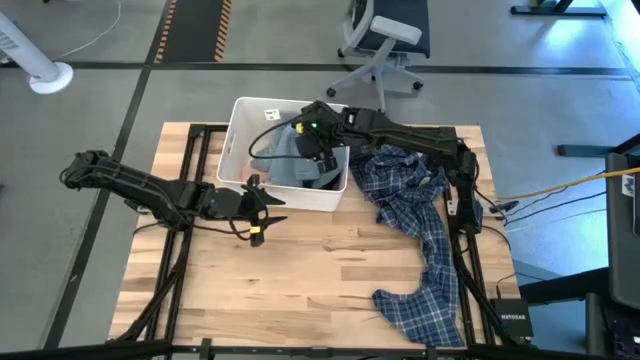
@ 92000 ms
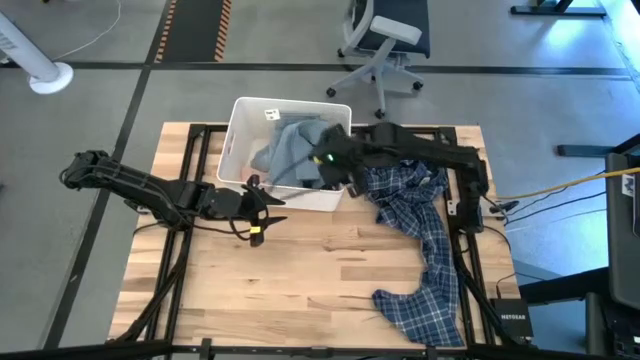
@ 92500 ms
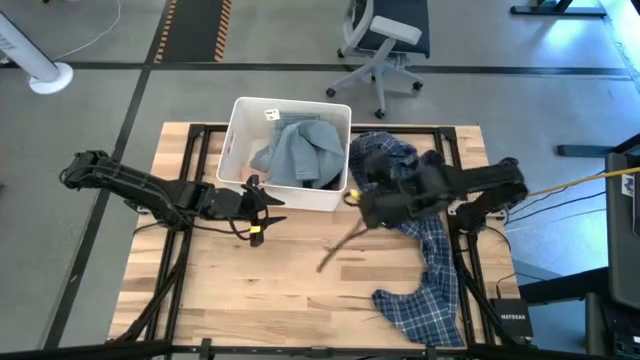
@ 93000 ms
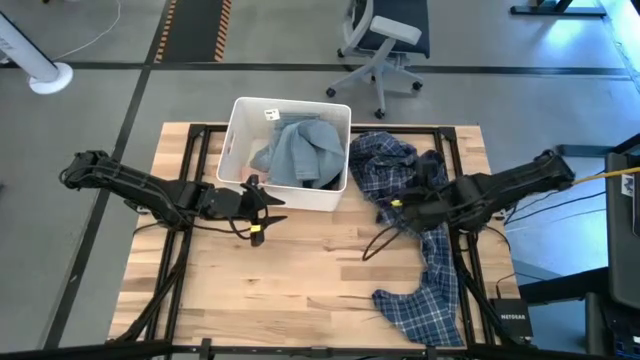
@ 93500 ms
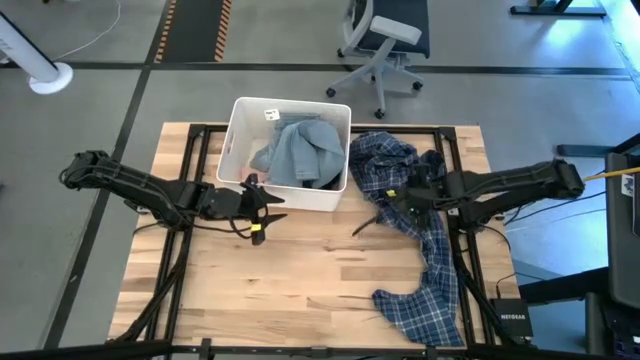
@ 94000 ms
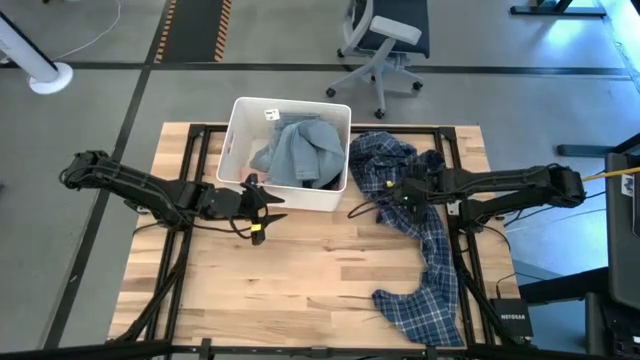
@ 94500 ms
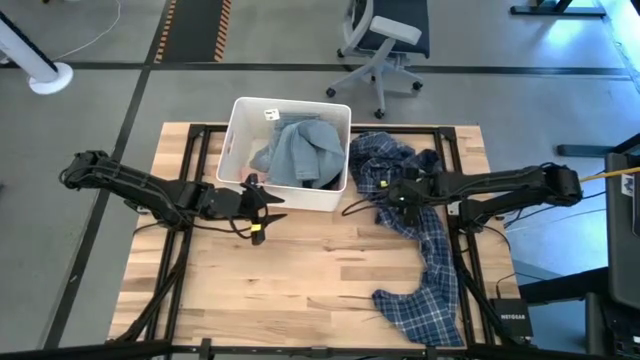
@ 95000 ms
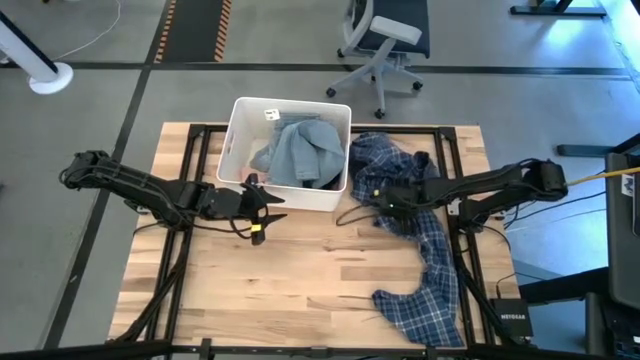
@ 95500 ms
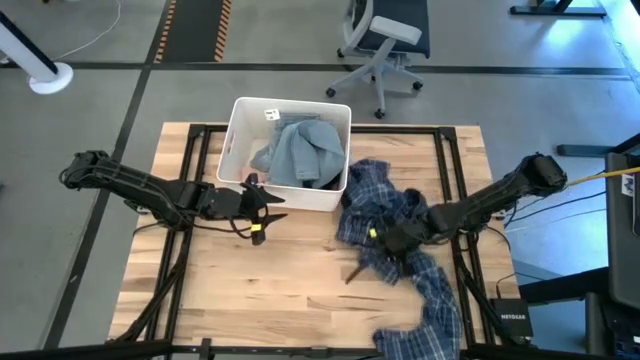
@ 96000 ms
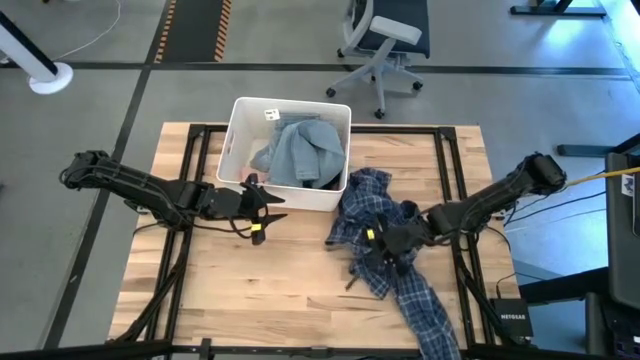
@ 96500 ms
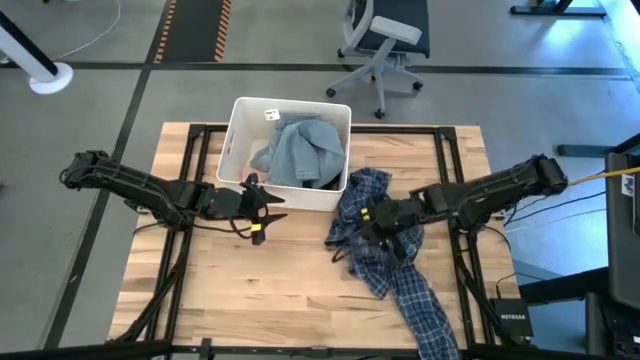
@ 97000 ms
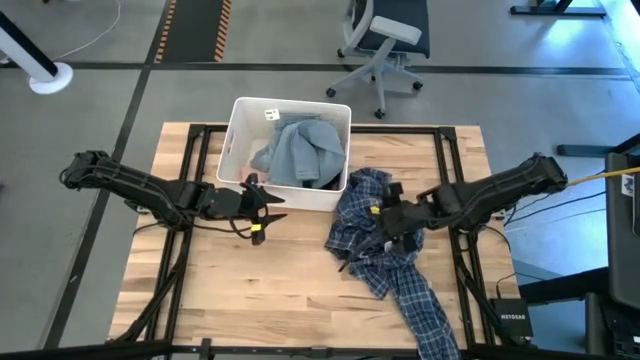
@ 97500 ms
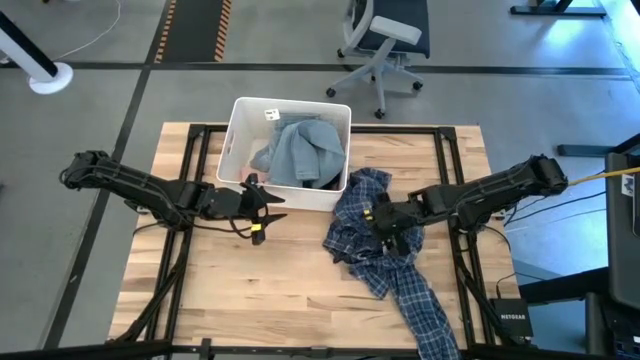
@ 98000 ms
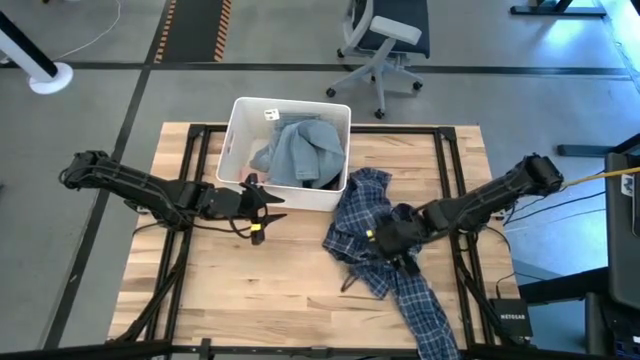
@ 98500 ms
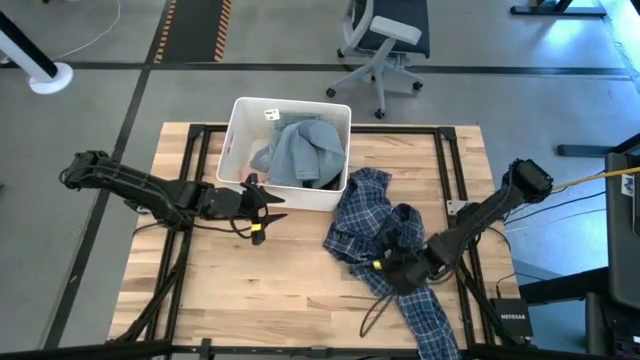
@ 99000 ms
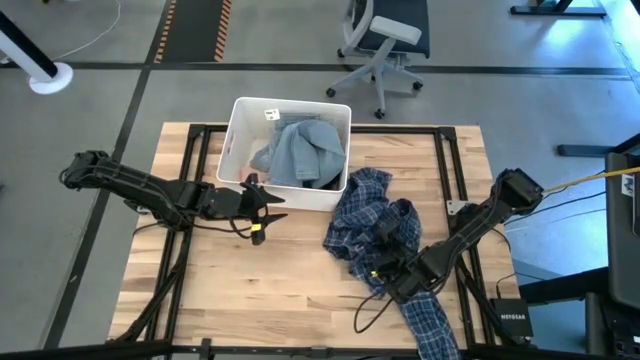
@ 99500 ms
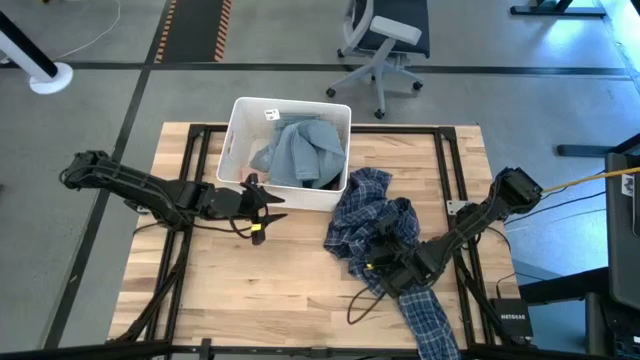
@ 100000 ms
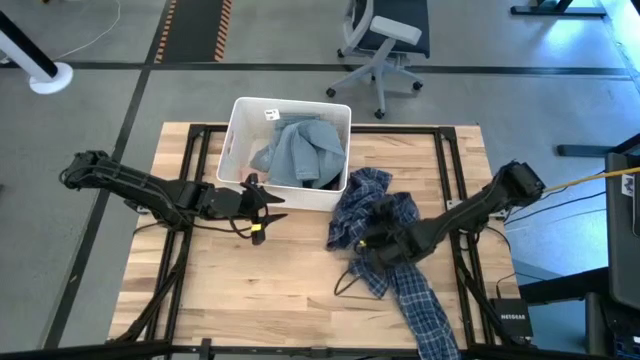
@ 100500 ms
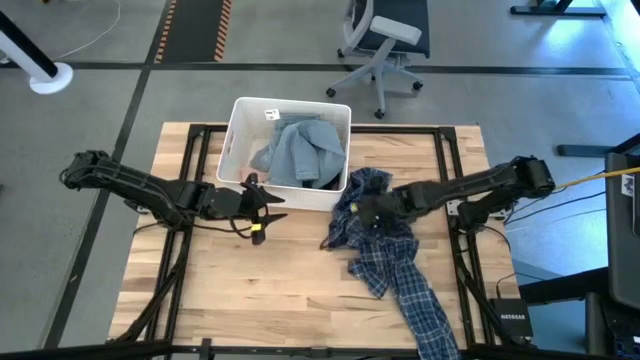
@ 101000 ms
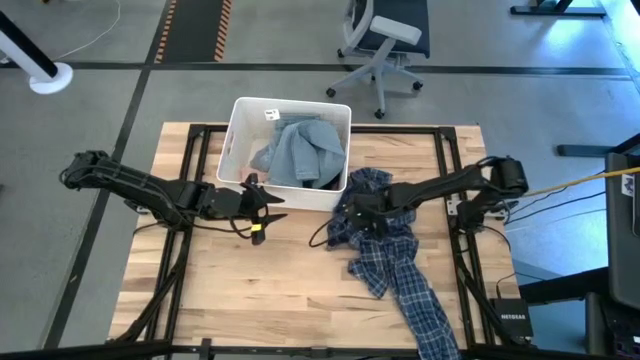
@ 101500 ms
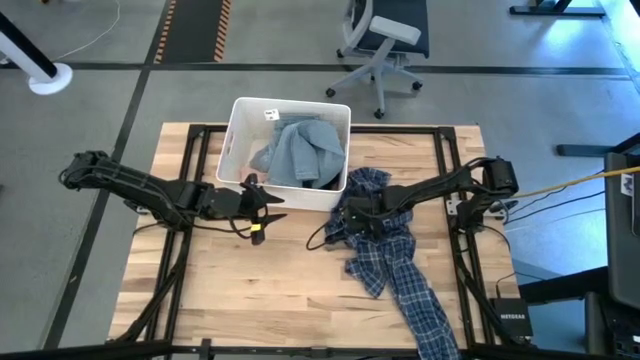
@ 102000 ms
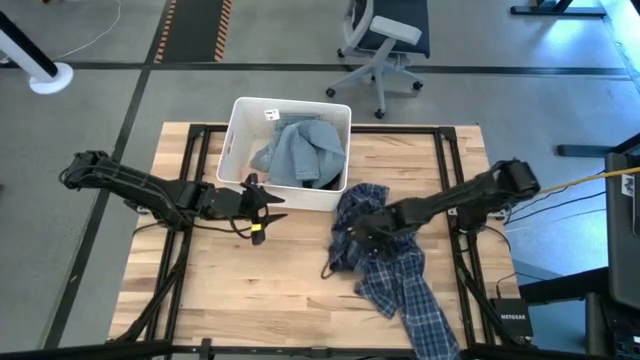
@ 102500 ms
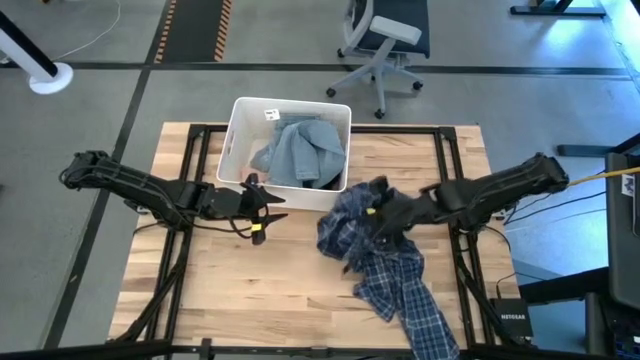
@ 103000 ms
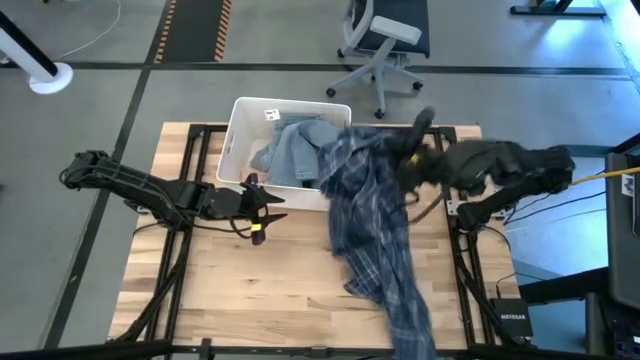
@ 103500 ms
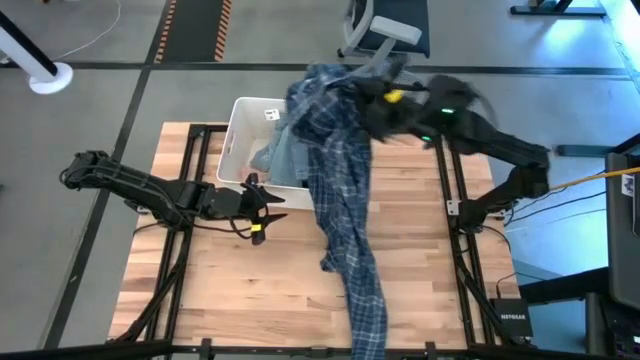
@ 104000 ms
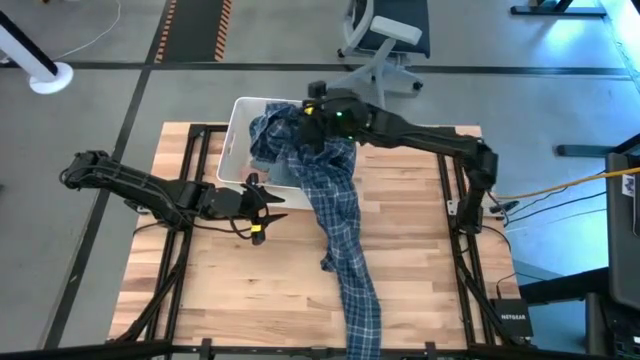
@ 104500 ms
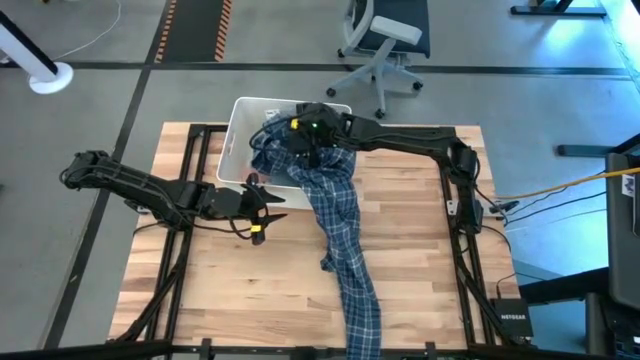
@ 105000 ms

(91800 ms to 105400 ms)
Task: Sort clothes
Put the blue patterned pants to the top right of the table

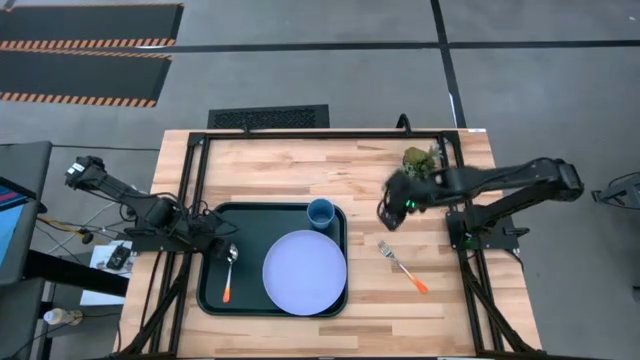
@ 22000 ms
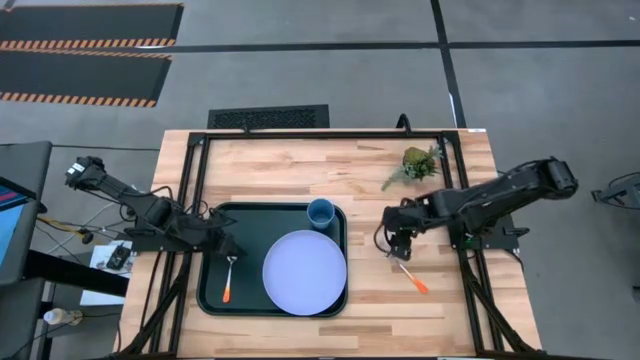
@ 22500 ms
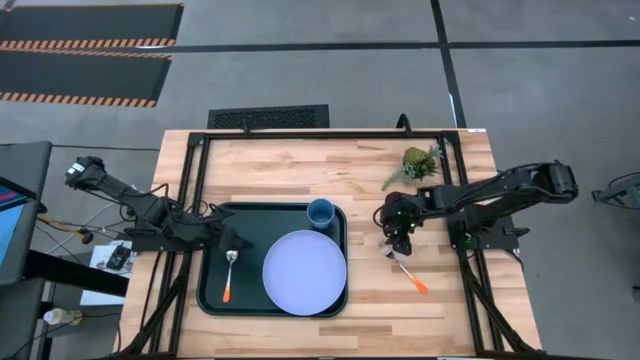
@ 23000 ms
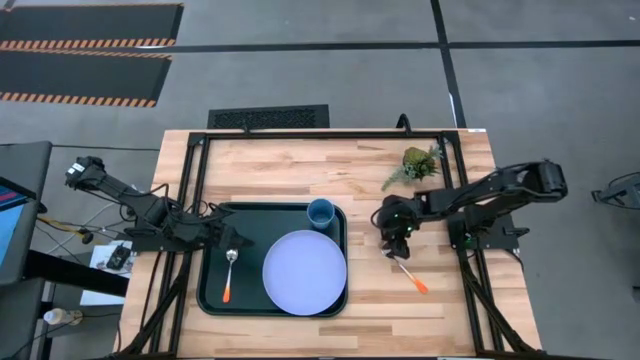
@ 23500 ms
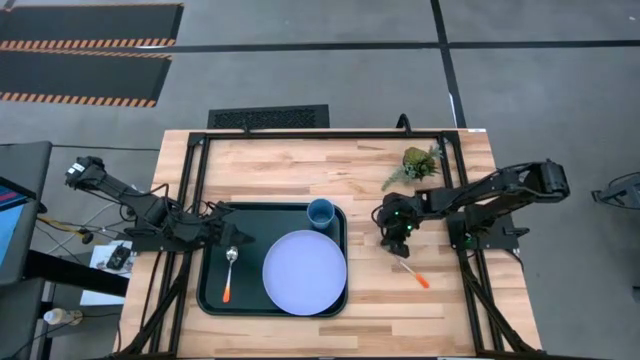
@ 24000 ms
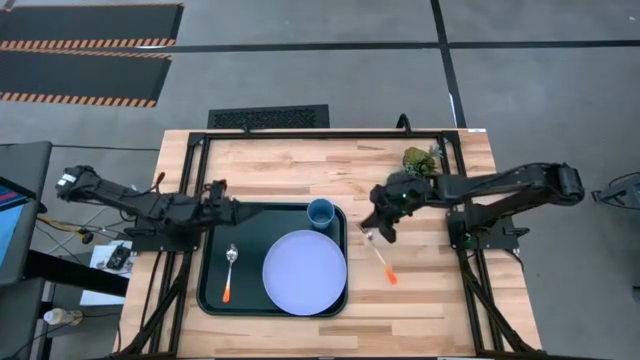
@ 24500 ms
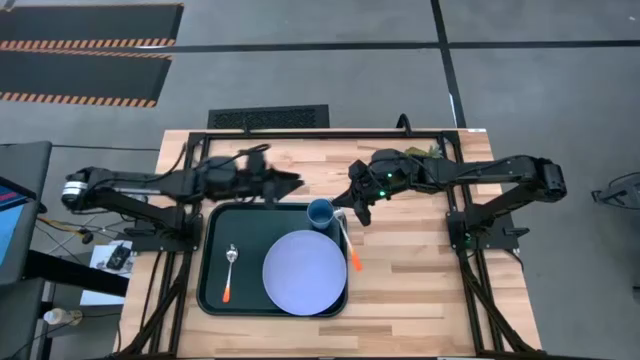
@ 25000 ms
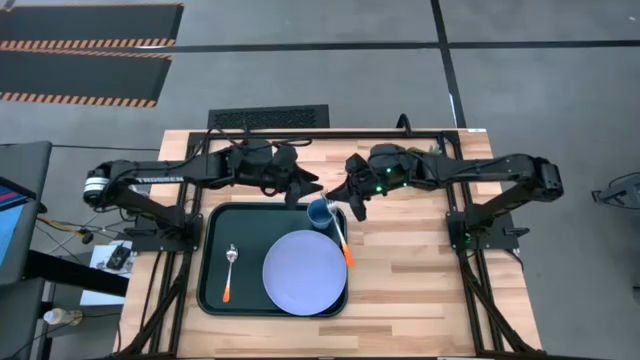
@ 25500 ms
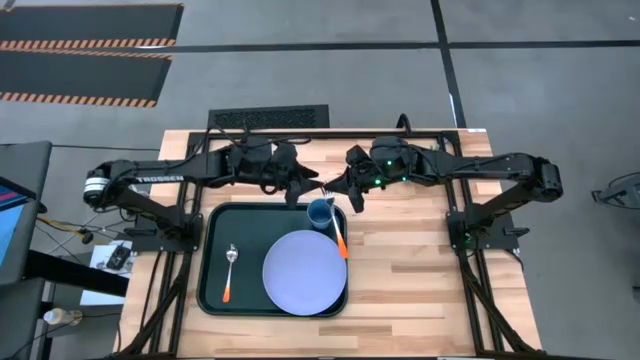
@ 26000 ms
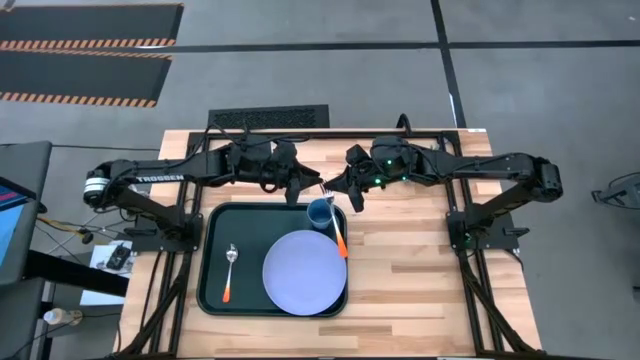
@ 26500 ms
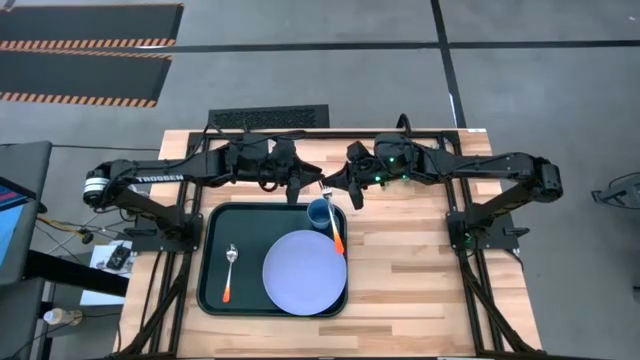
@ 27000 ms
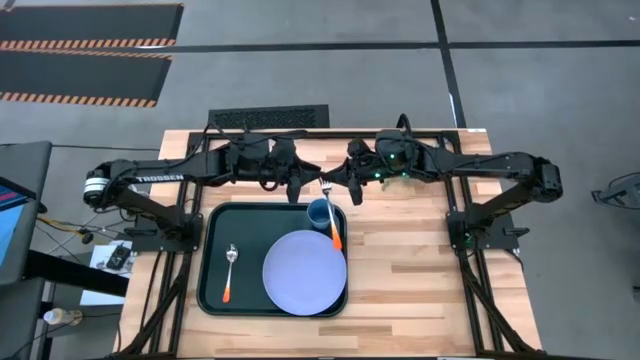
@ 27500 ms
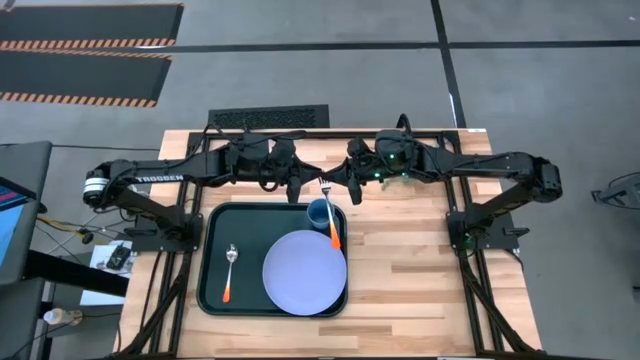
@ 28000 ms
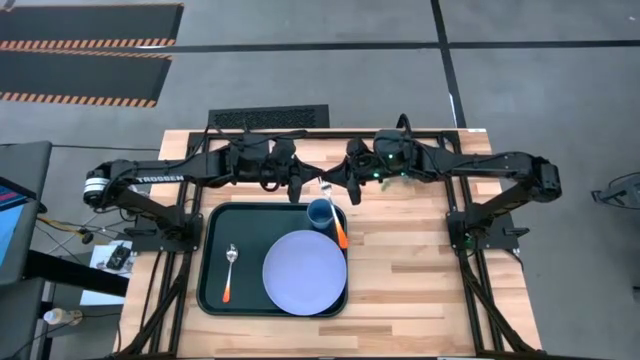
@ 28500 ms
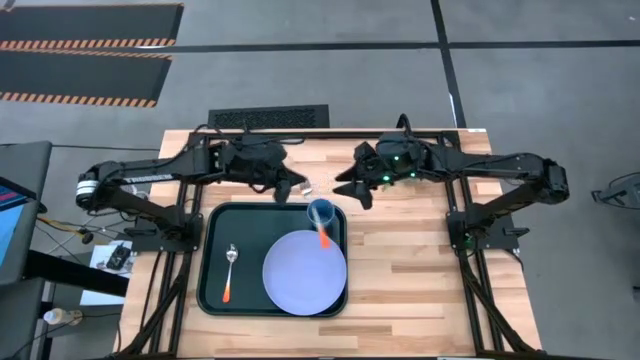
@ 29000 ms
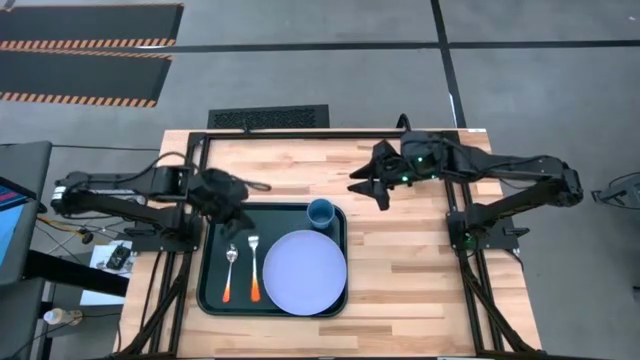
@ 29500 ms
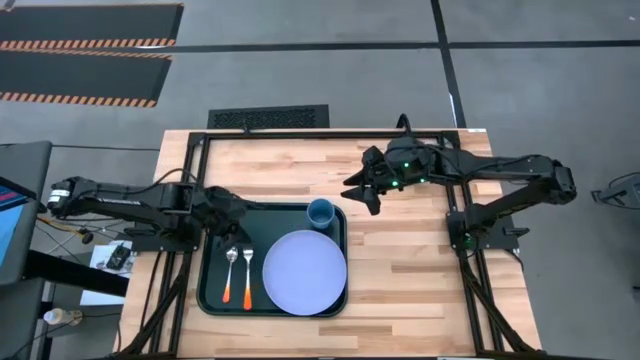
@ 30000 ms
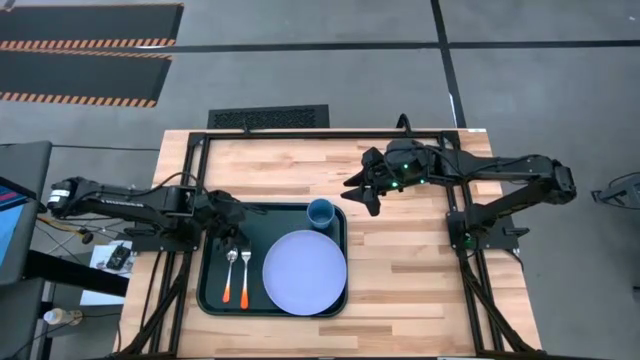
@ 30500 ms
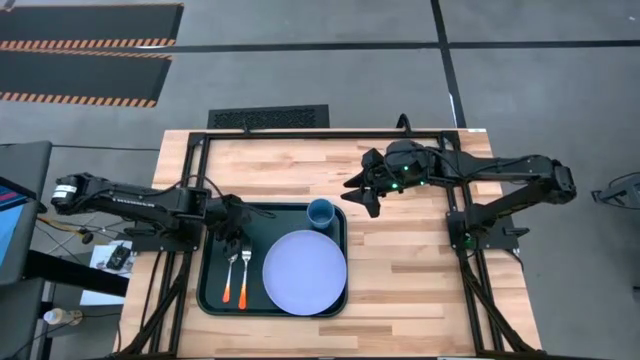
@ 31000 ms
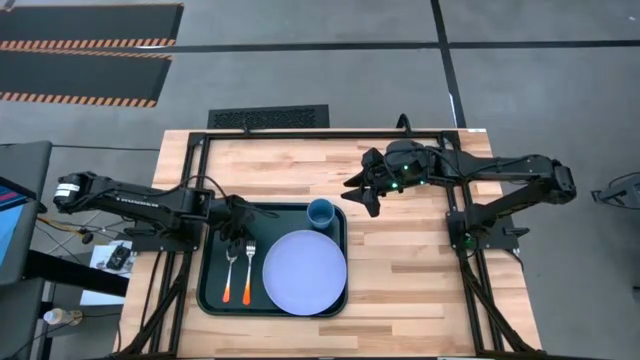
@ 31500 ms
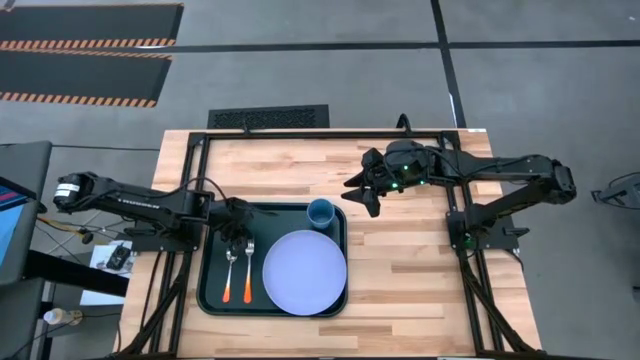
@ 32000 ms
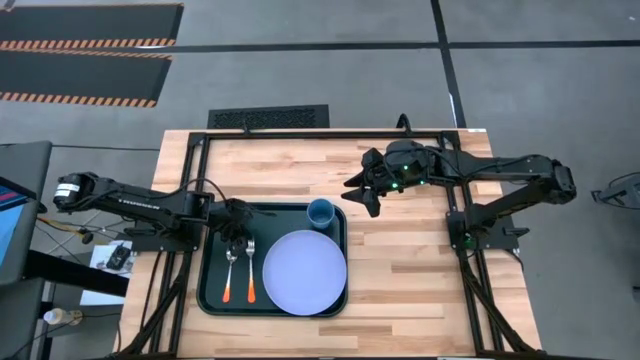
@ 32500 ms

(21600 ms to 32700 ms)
Task: Pick and place plate/cup/fork/spoon on tray
Put the orange fork on the right side of the orange spoon on the black tray
